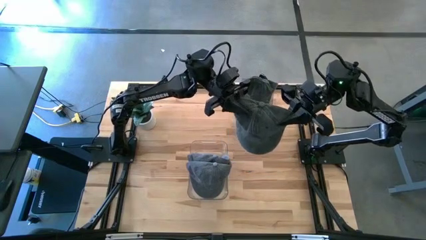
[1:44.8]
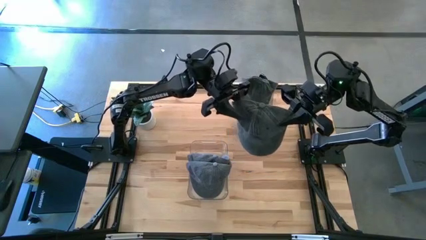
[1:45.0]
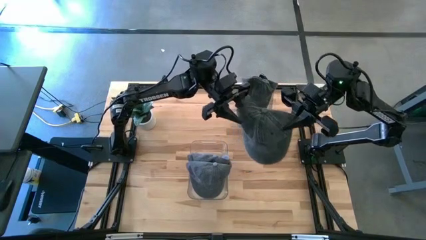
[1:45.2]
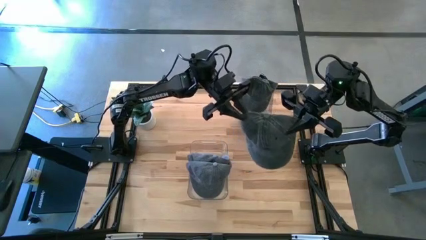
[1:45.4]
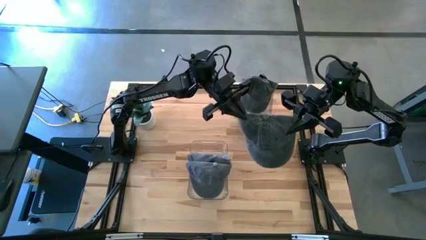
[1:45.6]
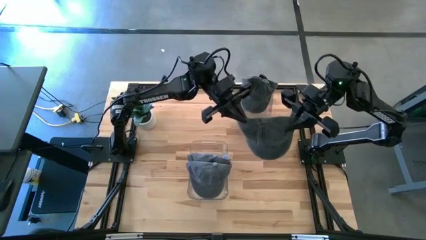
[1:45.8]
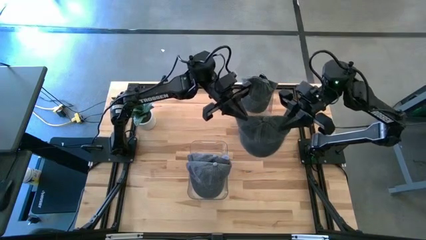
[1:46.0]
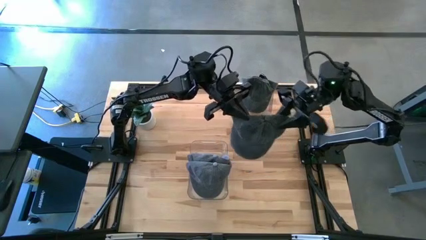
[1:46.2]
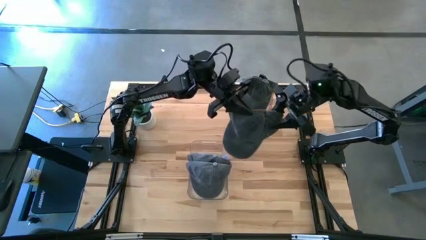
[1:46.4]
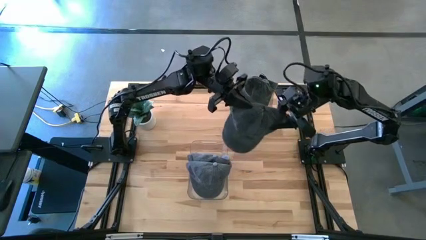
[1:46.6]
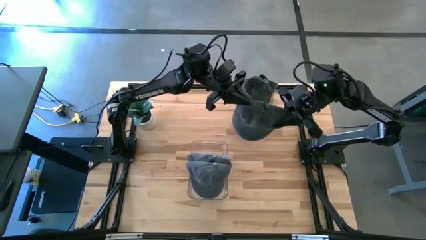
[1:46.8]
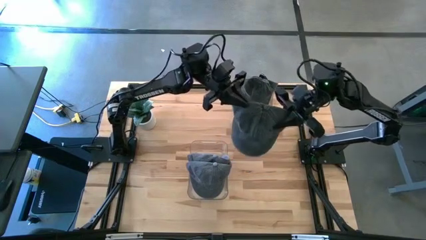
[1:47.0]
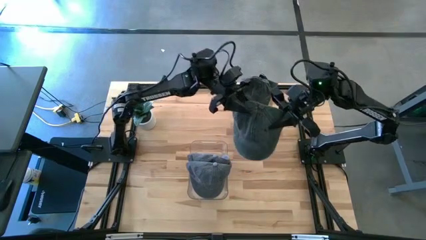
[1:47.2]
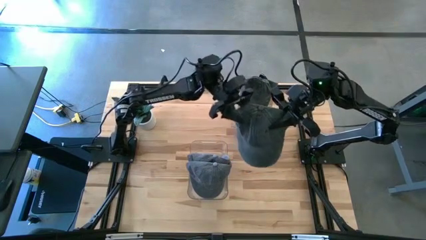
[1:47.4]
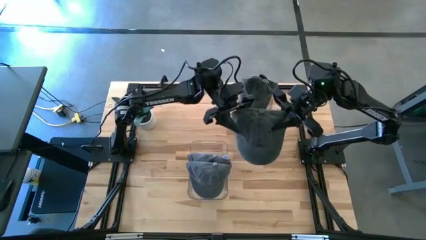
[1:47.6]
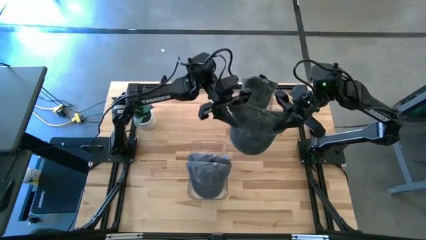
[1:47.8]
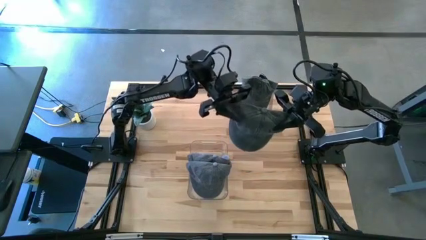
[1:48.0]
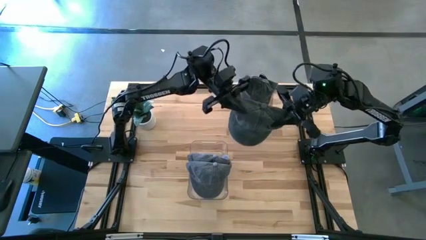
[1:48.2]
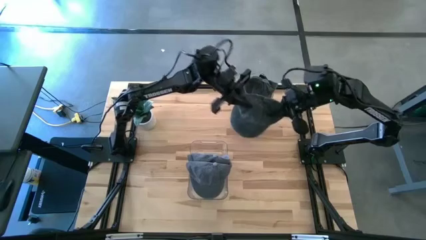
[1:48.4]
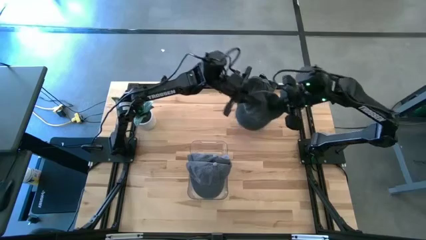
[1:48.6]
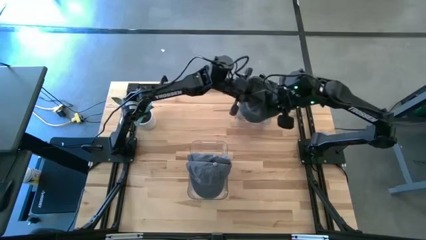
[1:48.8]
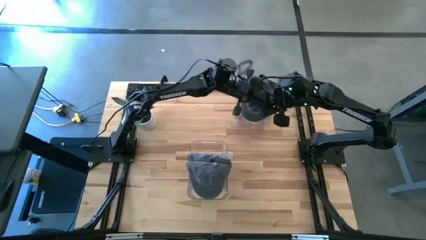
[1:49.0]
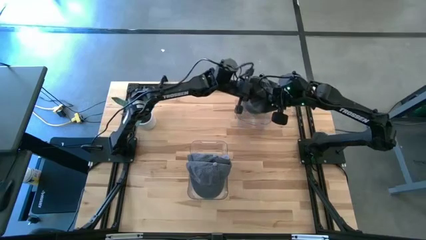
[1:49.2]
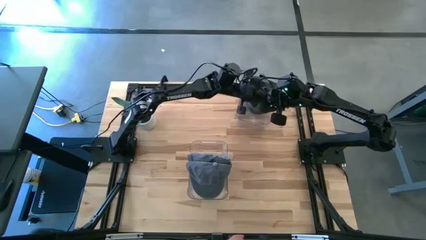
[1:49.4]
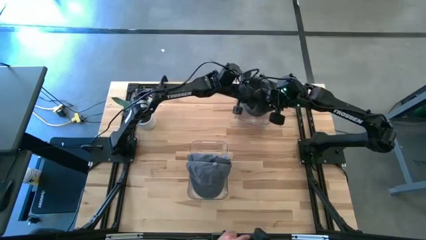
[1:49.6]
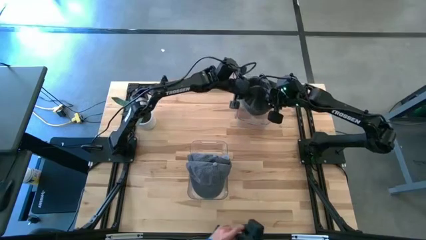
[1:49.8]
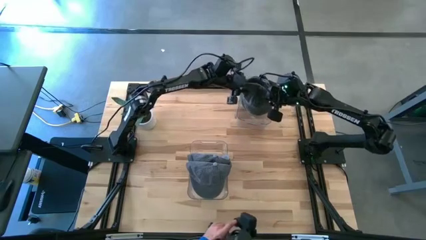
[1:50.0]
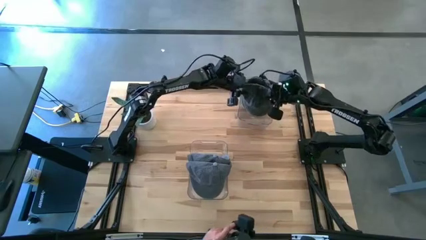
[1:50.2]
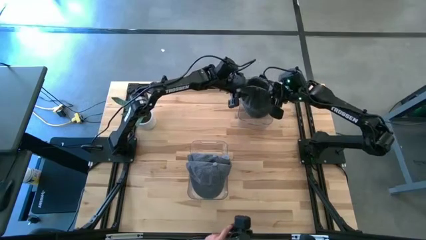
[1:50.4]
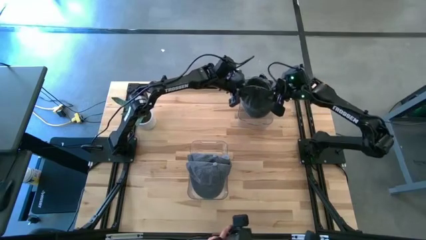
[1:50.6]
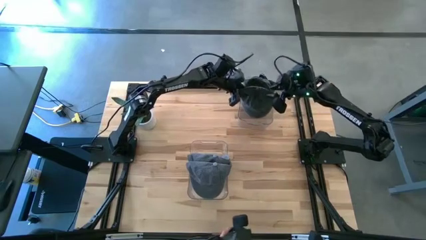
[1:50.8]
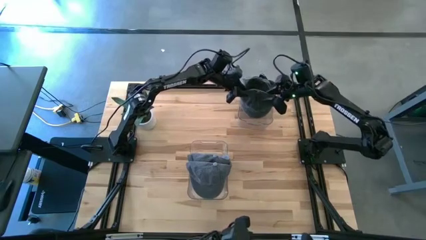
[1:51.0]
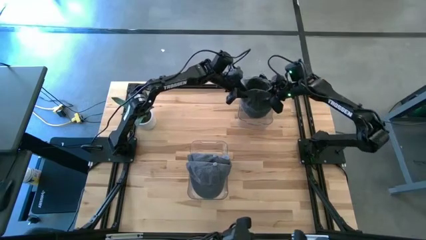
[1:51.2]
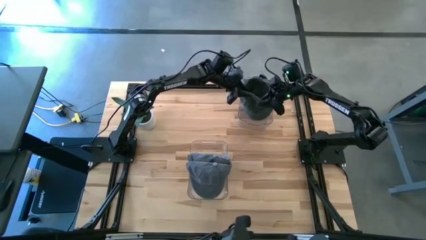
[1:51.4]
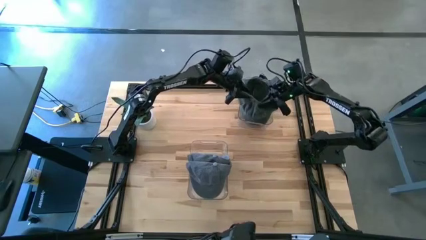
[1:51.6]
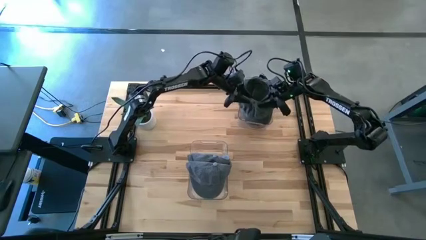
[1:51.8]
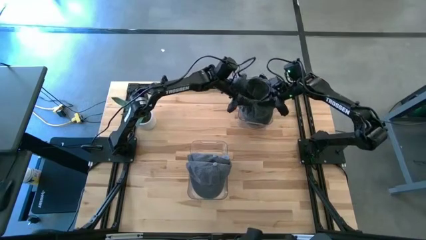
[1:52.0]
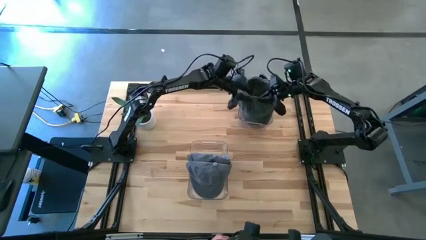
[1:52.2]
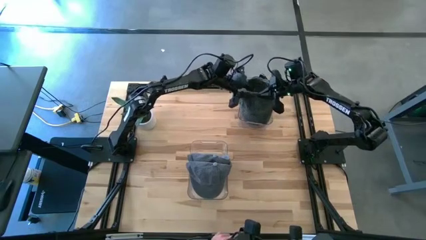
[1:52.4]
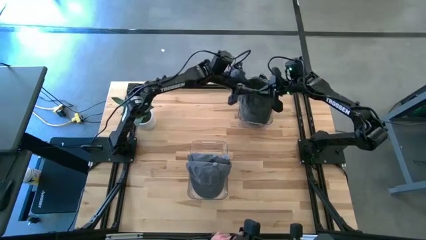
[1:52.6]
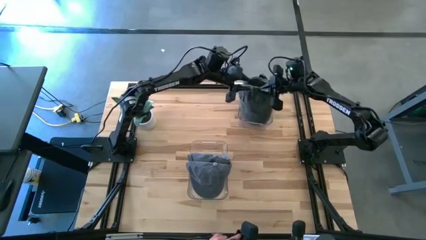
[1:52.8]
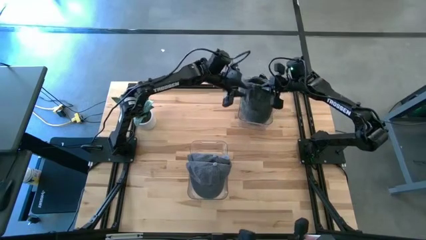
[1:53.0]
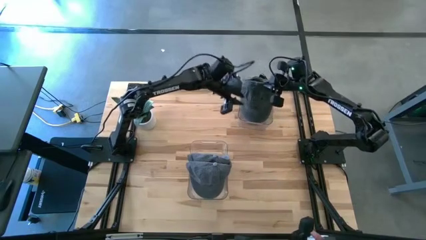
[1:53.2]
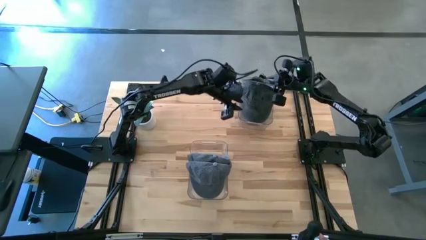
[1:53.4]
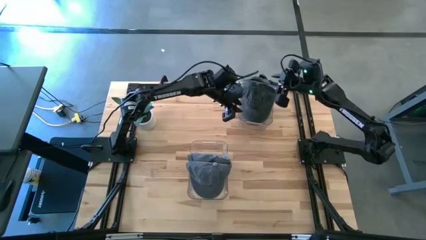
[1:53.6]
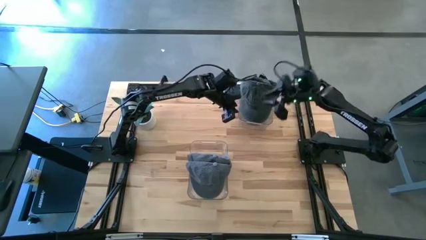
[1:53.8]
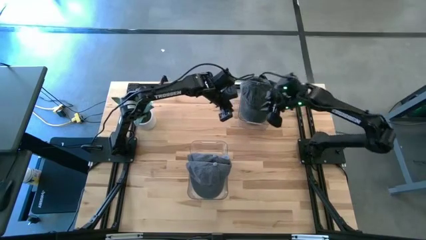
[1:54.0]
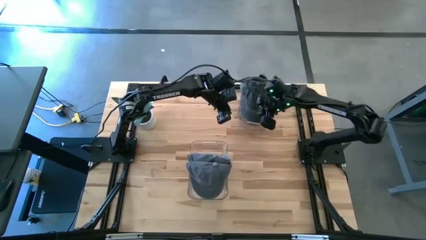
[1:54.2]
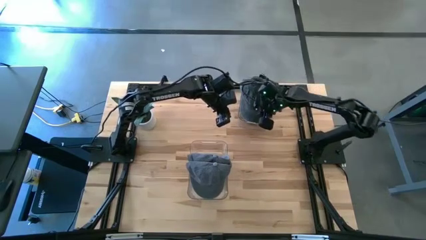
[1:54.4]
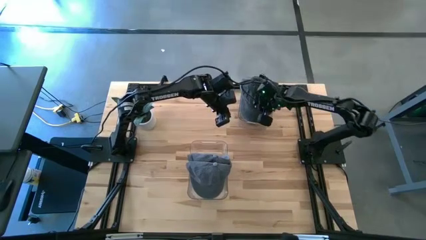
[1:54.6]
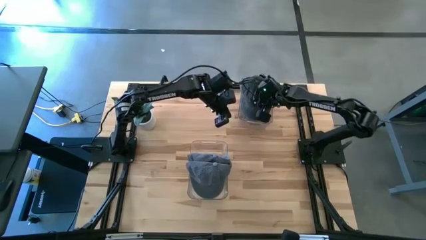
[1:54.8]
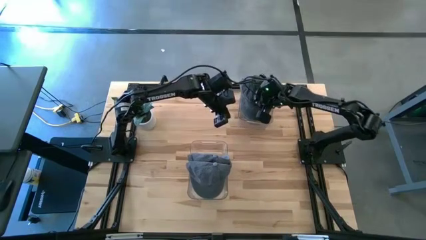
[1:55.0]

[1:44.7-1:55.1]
Task: Pick & Place hat
Put the black cap into the top transparent bin

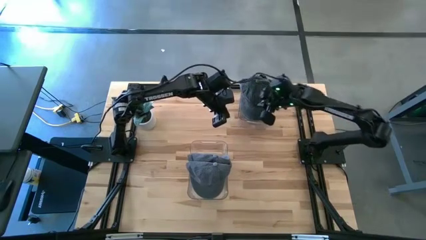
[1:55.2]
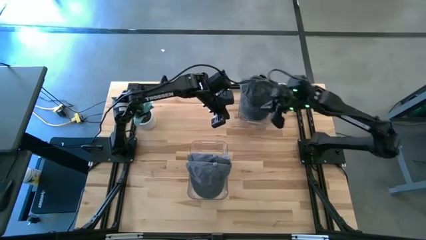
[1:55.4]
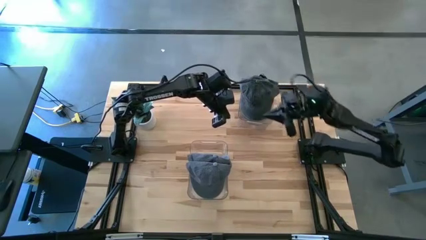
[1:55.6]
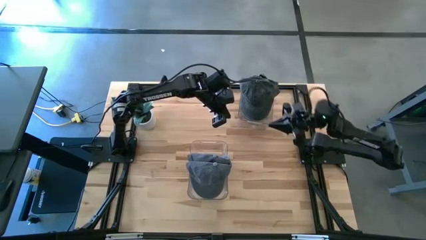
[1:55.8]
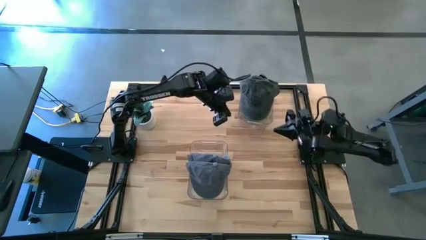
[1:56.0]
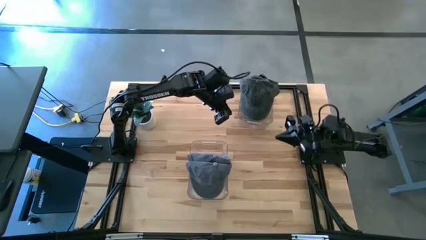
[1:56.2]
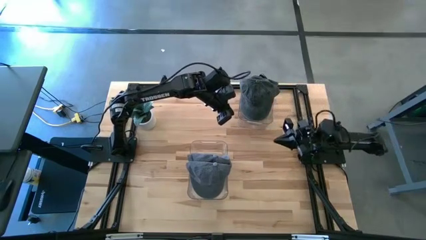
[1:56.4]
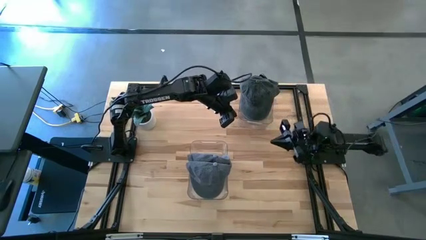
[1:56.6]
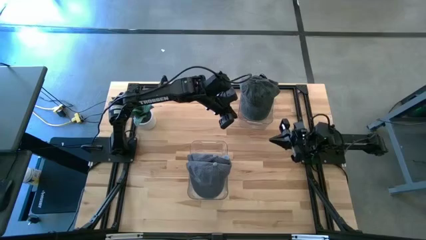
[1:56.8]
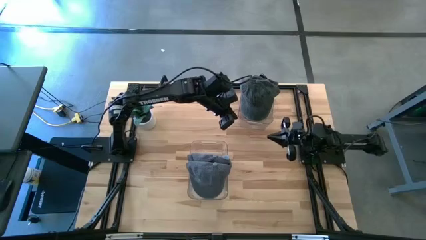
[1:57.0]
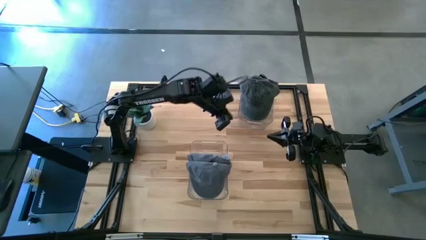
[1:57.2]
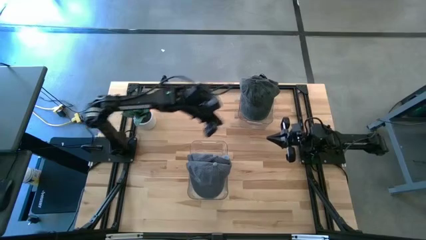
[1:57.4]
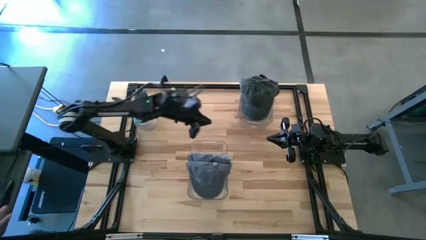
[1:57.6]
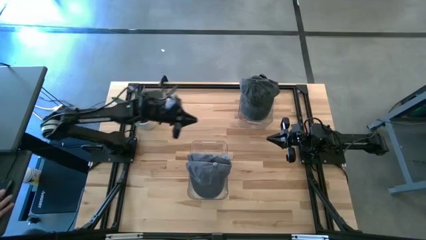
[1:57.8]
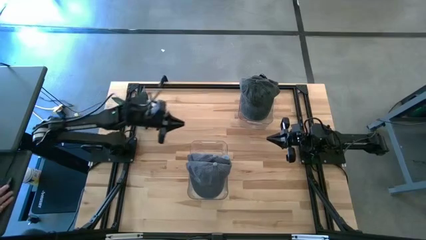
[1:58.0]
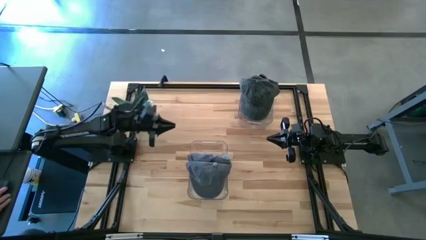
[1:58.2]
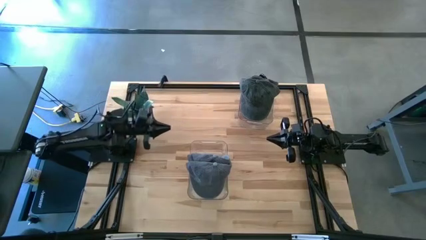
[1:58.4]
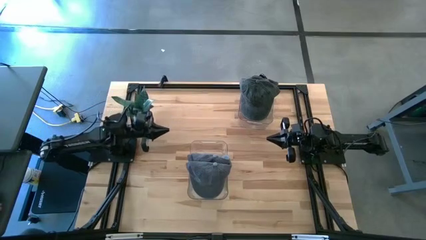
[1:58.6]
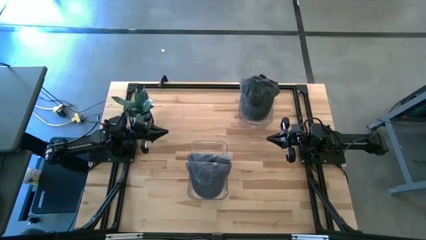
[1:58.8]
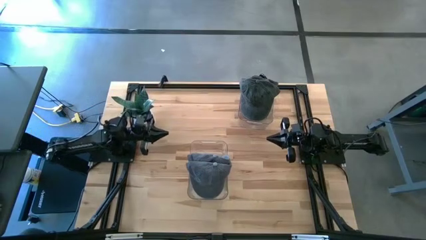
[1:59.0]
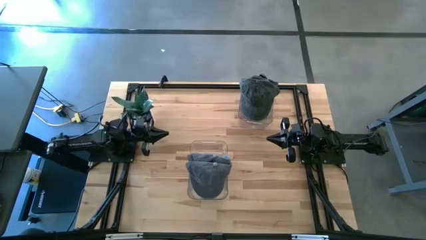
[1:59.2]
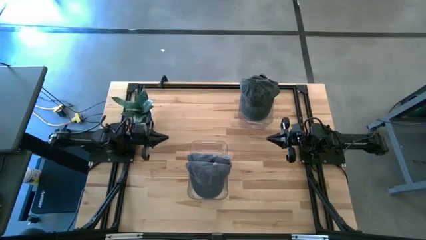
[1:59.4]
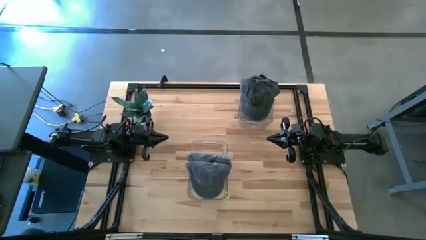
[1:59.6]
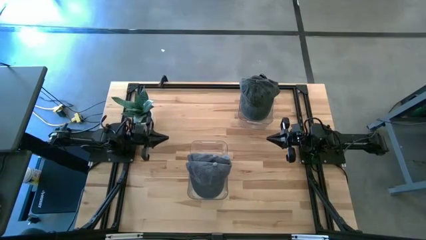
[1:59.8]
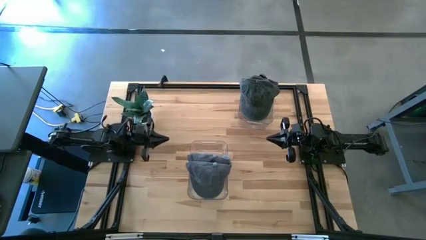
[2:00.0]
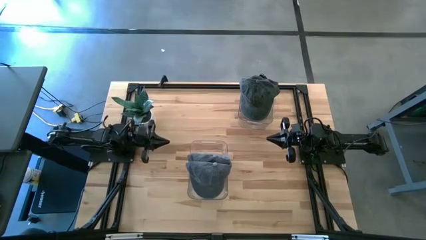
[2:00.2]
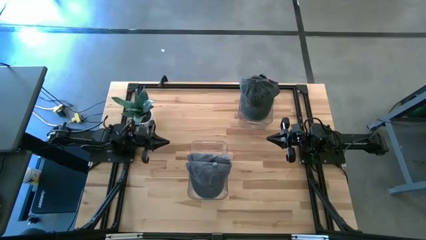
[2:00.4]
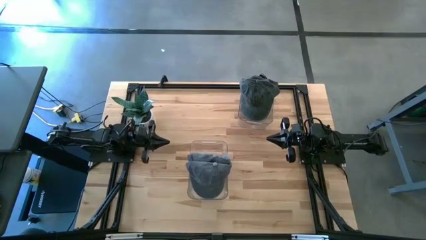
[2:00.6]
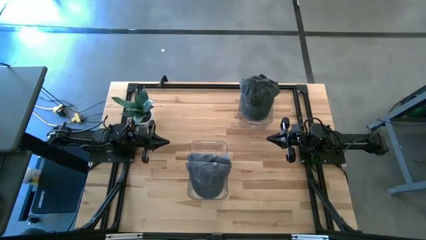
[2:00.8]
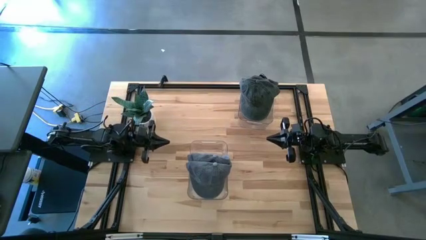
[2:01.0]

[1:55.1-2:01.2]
Return to Home Position
